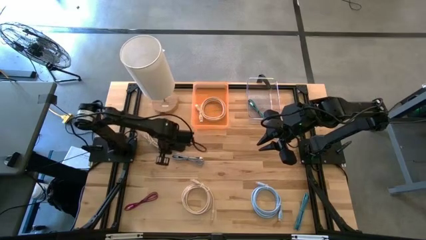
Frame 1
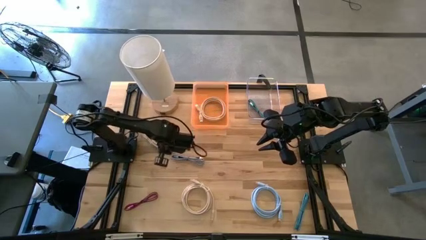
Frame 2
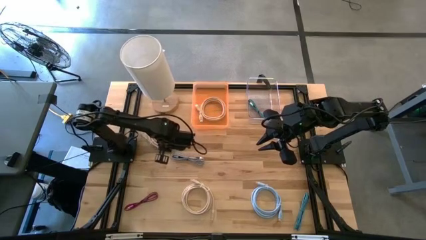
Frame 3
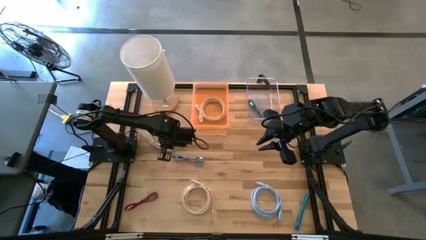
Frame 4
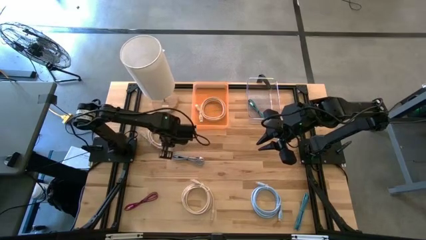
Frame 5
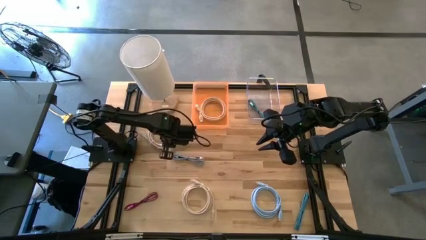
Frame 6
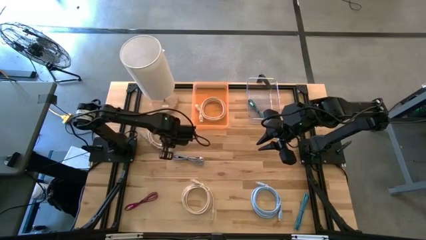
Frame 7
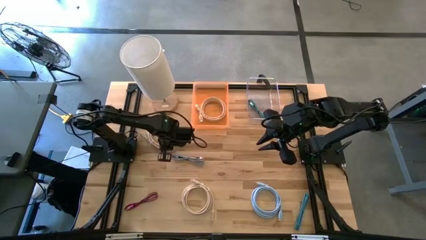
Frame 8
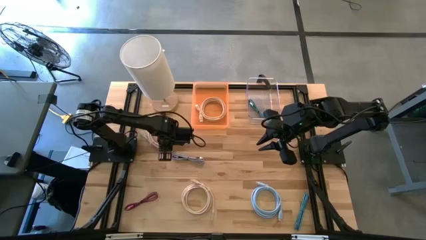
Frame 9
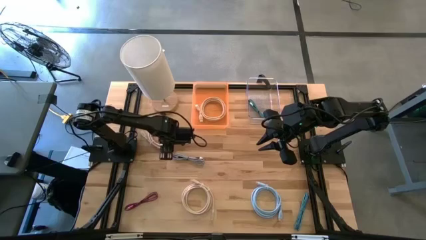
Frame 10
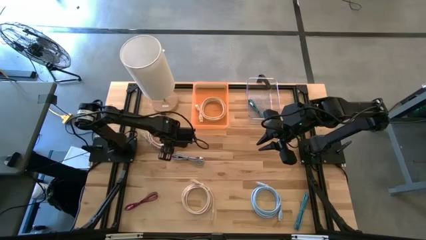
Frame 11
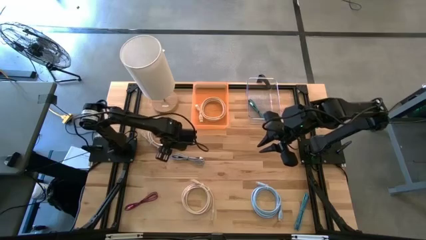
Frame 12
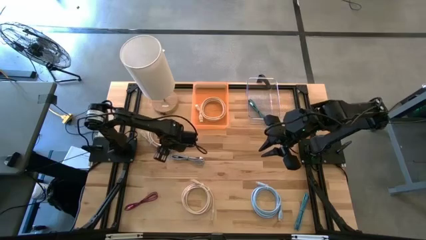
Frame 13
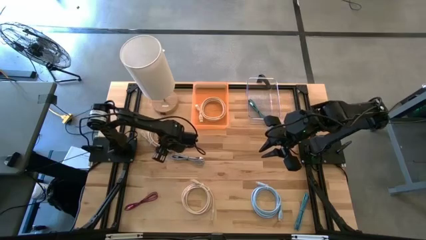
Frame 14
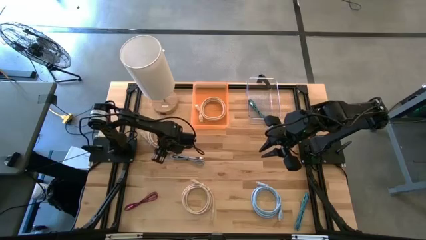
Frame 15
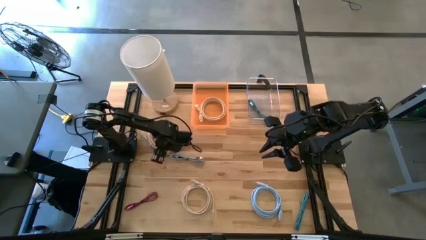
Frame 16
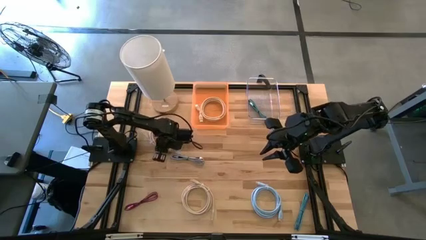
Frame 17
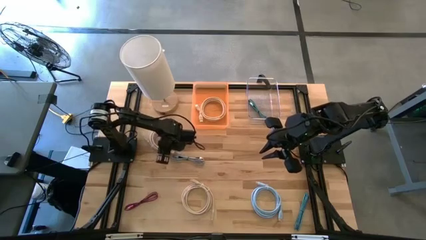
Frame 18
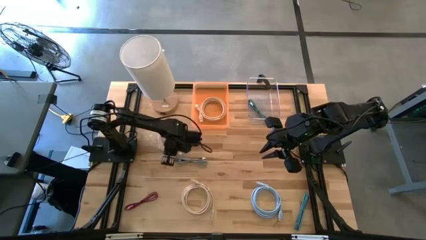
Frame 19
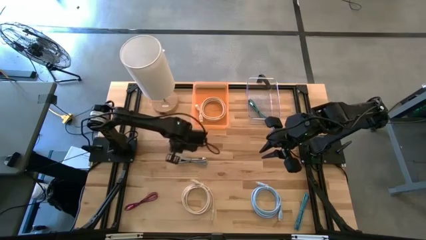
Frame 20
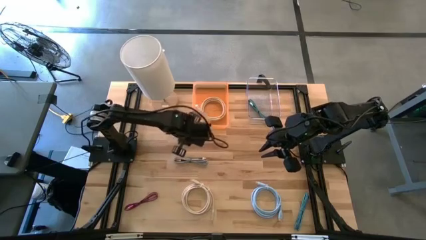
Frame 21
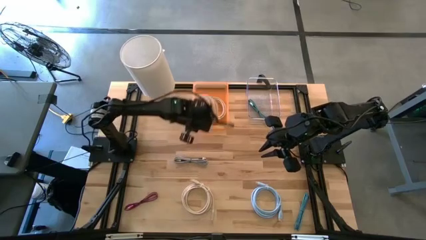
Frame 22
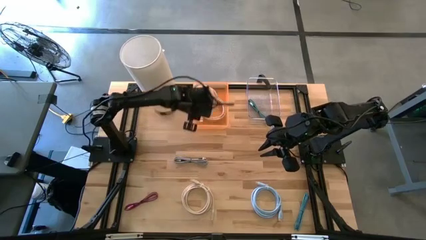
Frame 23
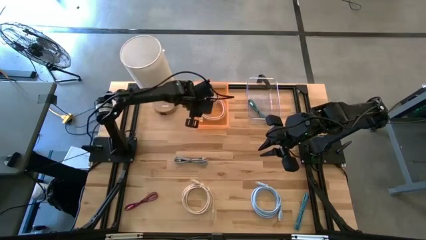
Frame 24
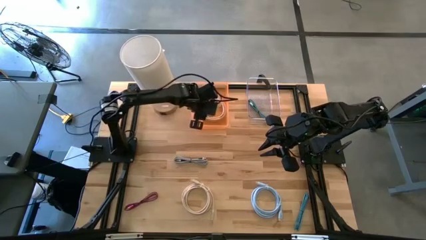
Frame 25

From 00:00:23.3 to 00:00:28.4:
Task: Pick & Place USB Port
Put the top light brown HDMI cable into the orange bin

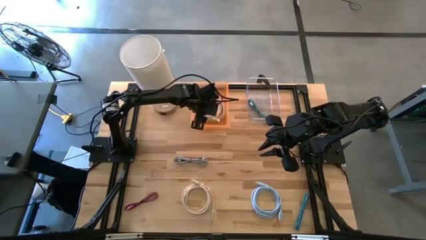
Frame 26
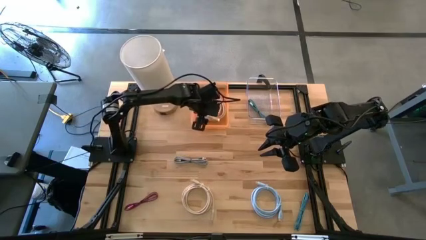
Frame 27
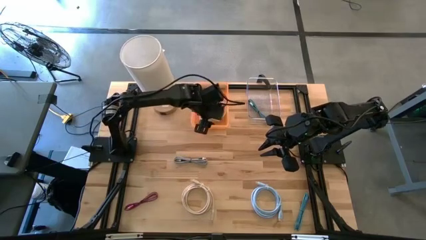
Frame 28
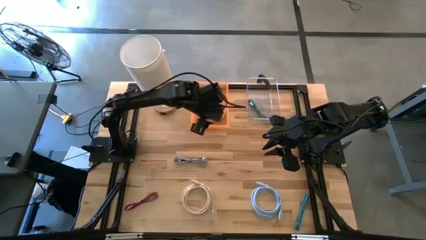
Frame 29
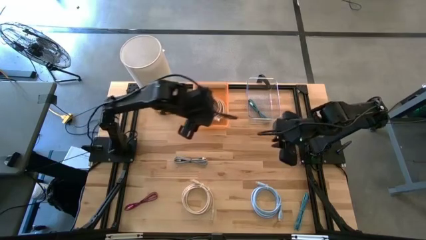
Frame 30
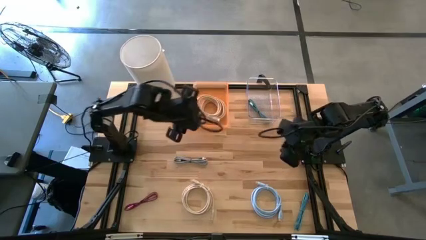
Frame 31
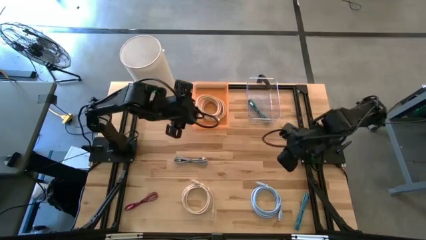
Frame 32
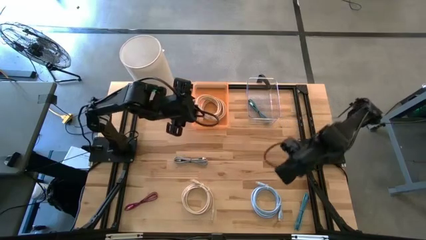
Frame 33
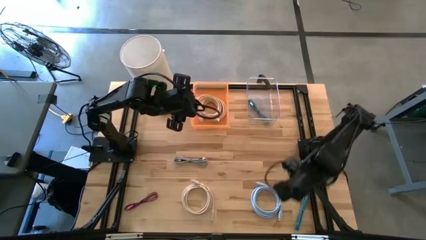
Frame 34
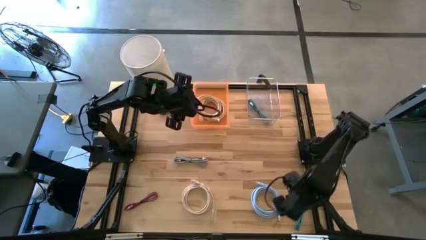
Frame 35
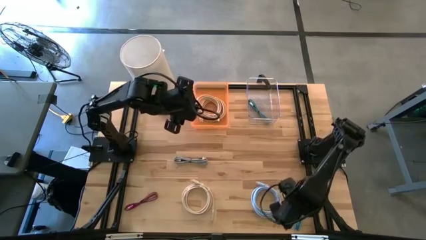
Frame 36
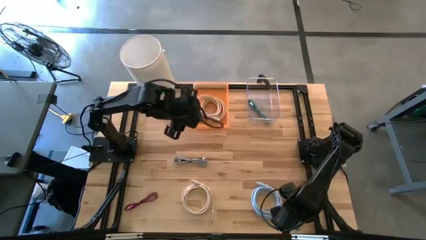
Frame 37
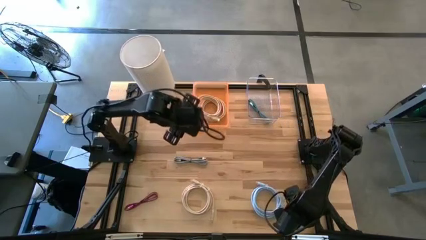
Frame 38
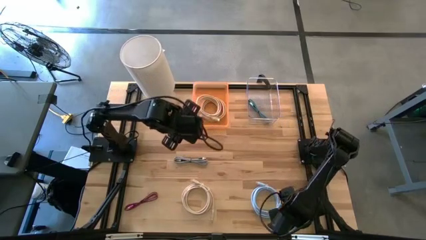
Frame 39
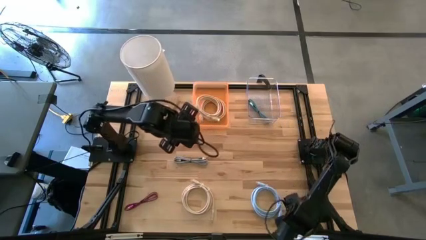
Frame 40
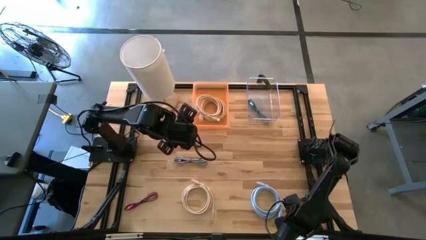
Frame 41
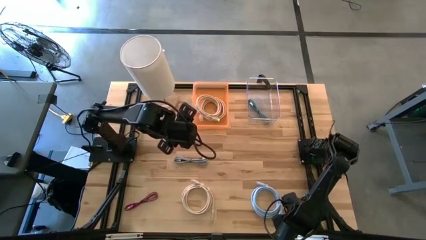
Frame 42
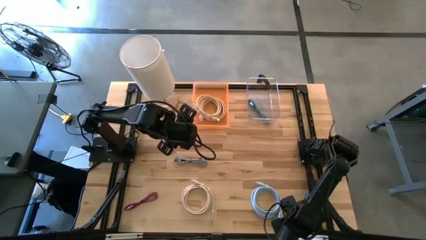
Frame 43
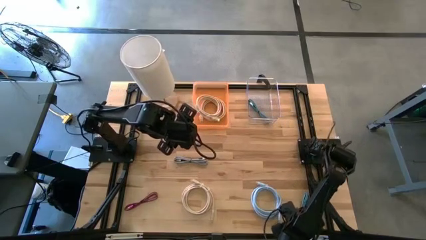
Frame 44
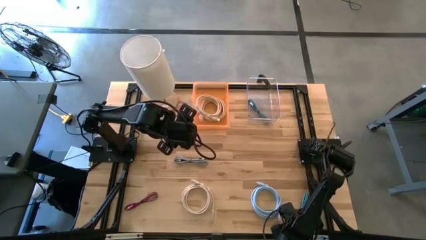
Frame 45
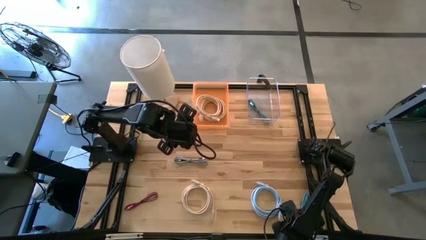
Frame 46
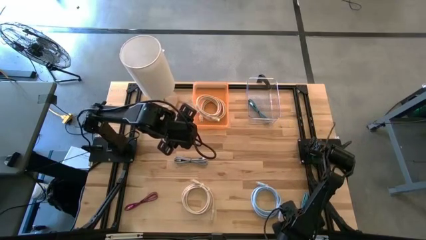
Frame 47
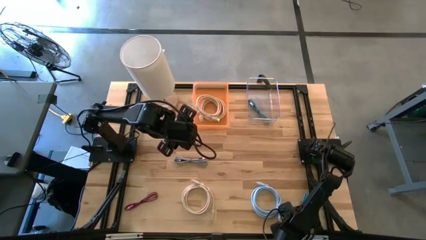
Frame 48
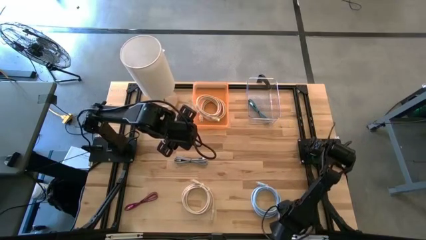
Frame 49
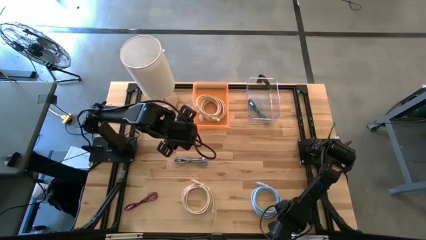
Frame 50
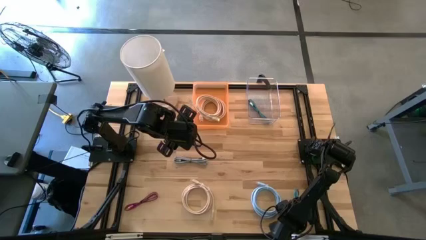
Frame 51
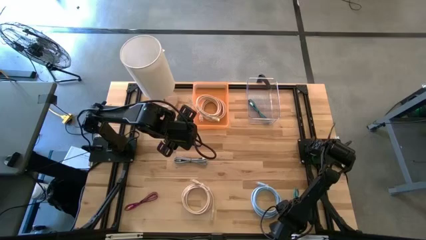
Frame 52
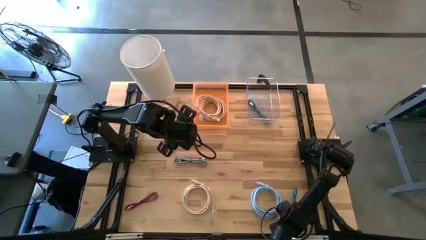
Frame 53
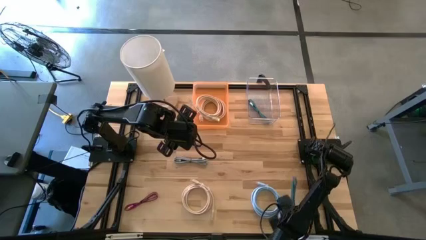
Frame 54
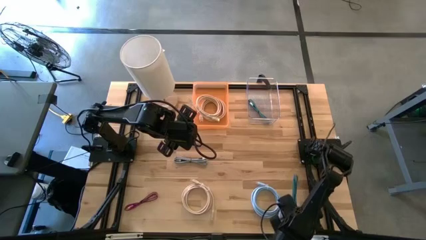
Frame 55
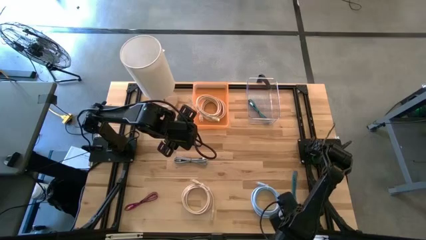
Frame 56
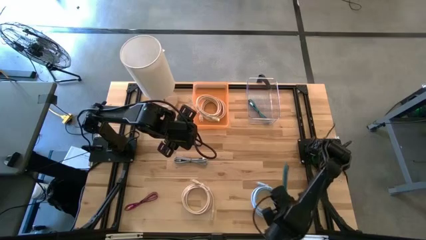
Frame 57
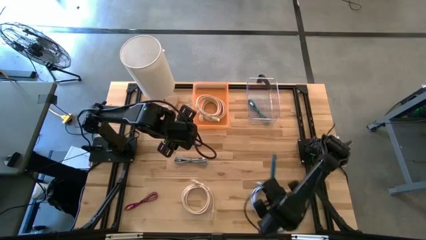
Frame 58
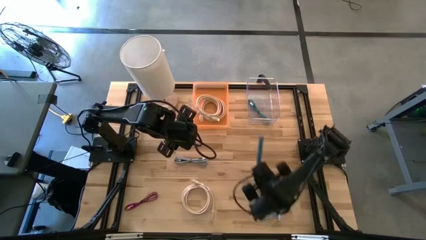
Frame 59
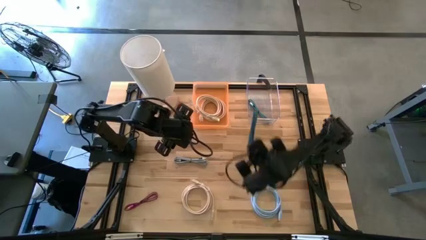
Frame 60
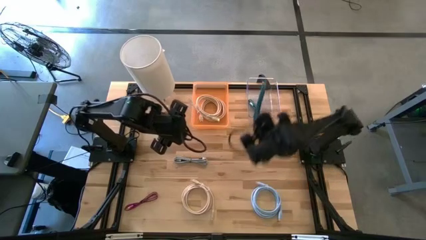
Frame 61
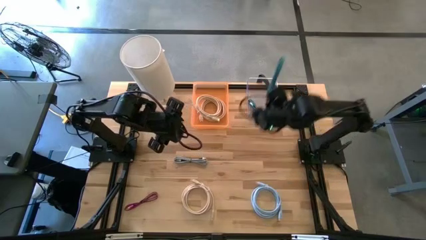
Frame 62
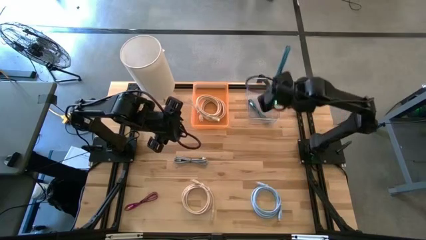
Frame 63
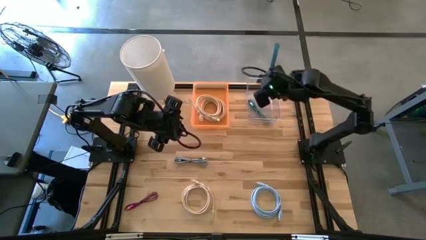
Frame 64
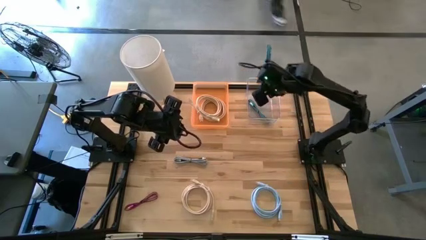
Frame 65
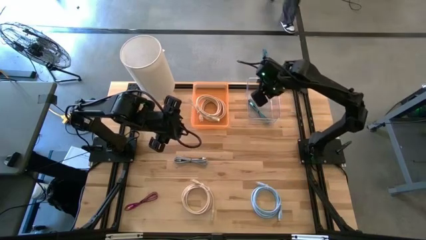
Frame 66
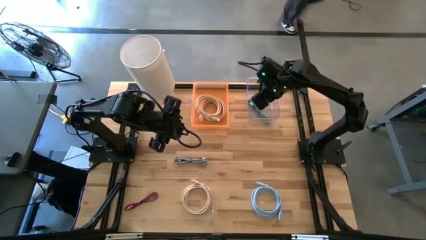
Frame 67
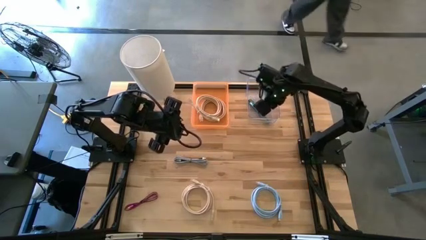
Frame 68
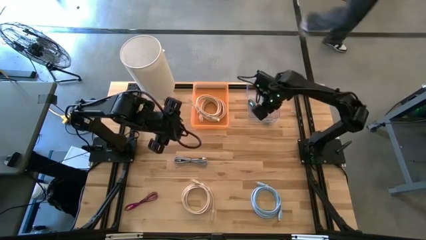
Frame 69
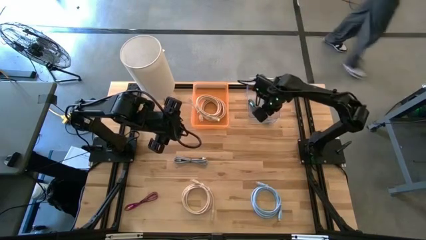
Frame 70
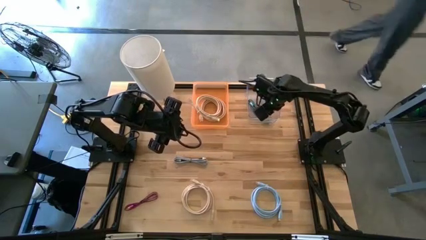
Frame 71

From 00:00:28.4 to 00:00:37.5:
Put the black blue charger cable into the transparent bin
